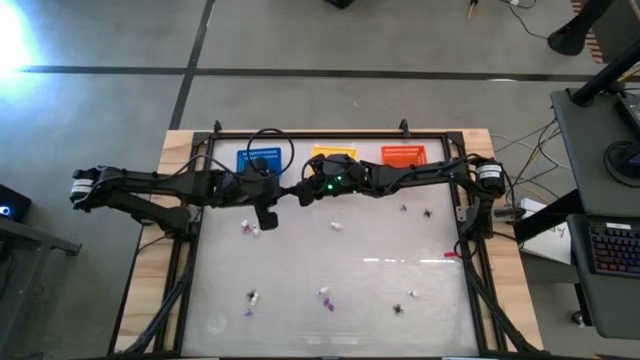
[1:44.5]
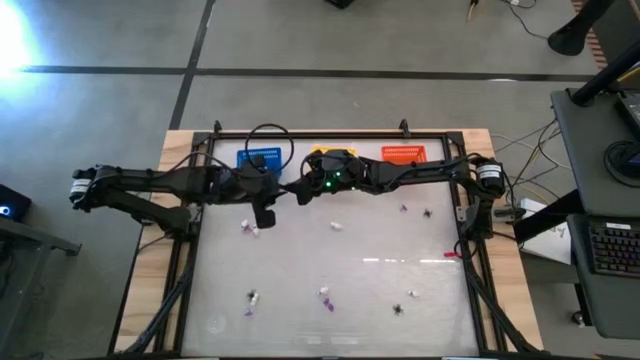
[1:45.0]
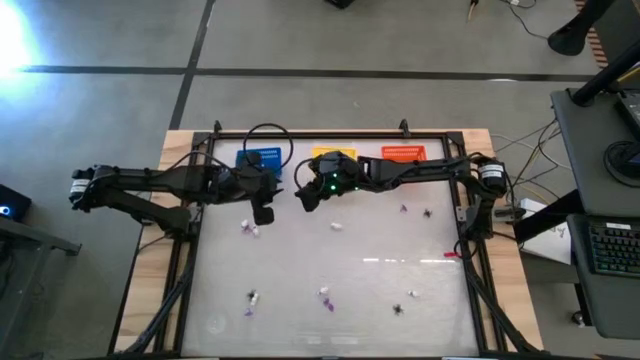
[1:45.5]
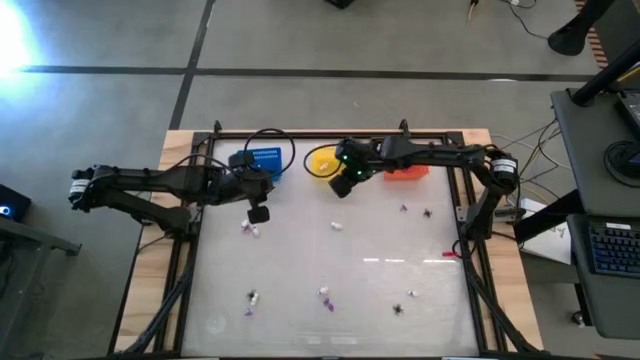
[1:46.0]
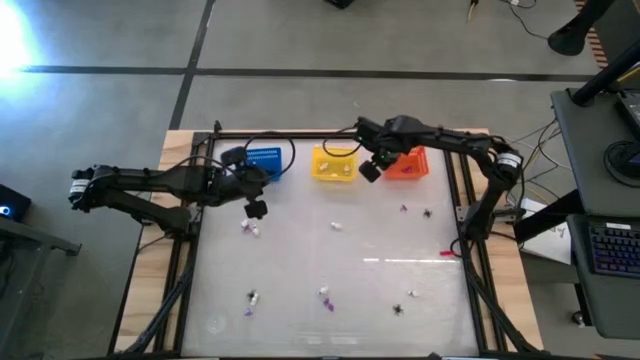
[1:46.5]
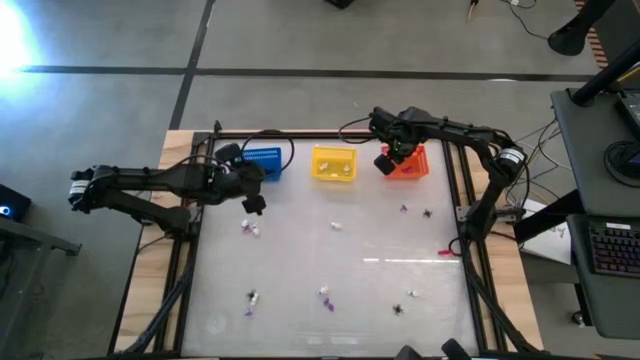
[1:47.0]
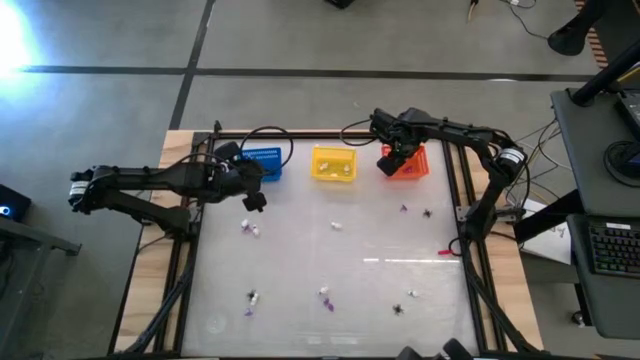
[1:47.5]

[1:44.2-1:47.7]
Task: Sort Halloween decoration
Put the purple hat toy into the orange bin

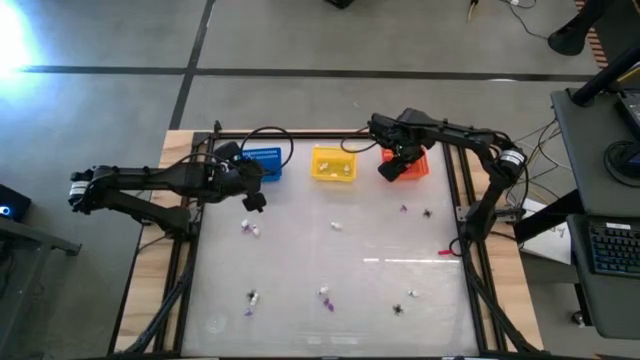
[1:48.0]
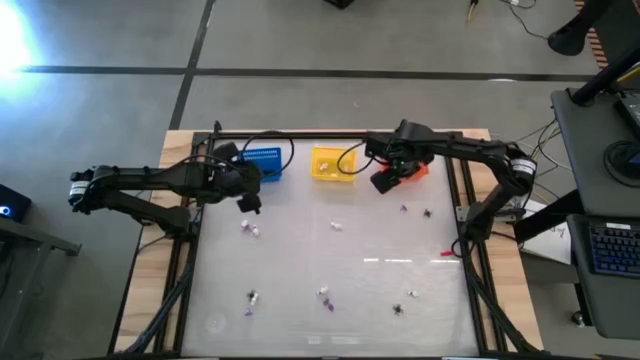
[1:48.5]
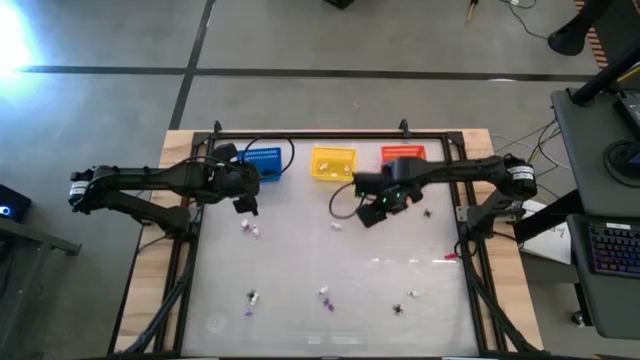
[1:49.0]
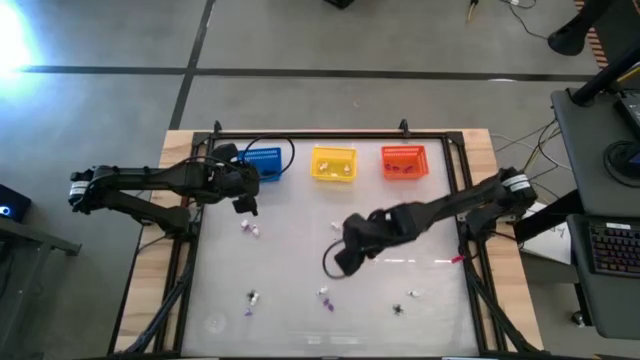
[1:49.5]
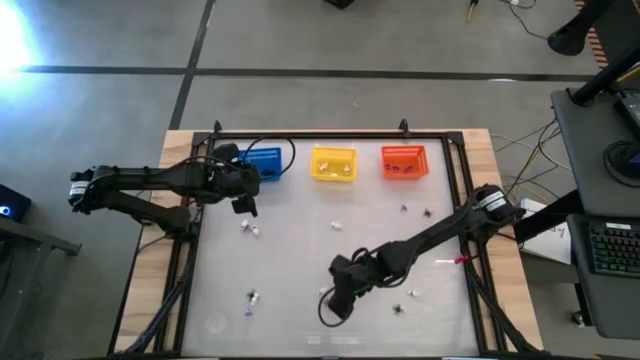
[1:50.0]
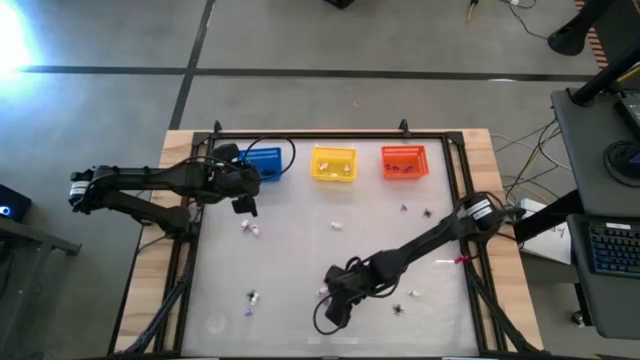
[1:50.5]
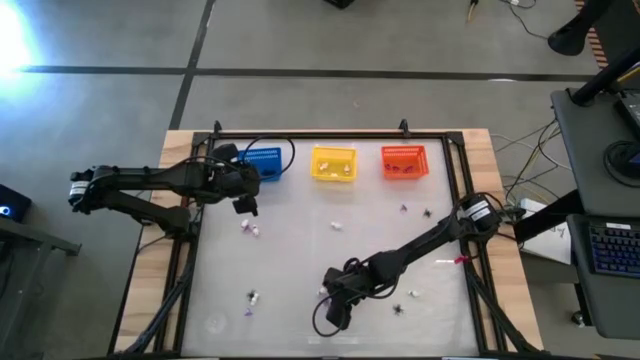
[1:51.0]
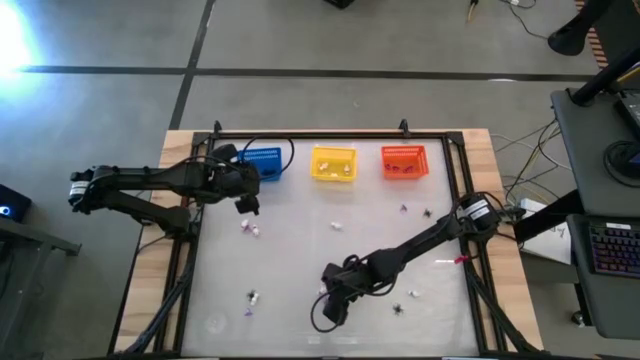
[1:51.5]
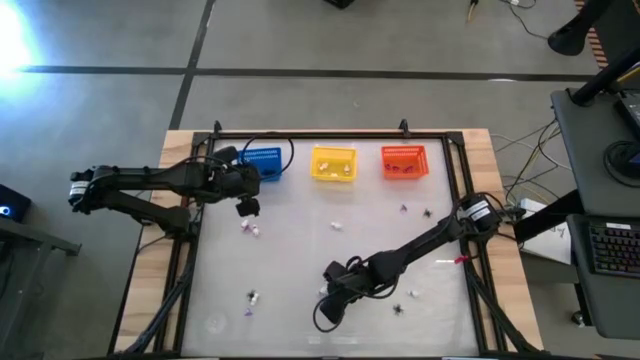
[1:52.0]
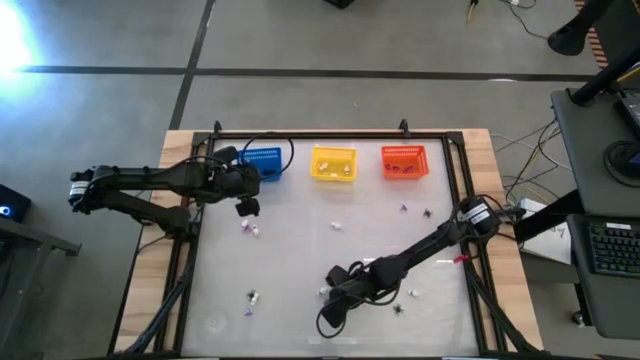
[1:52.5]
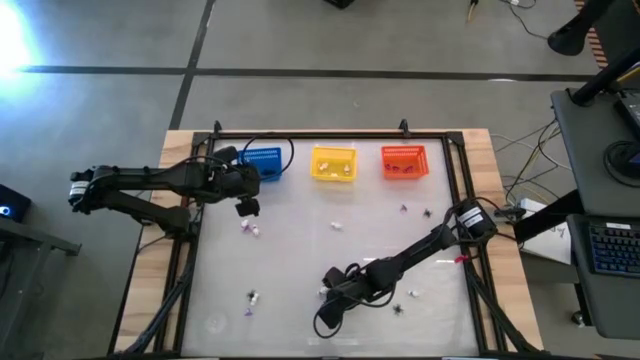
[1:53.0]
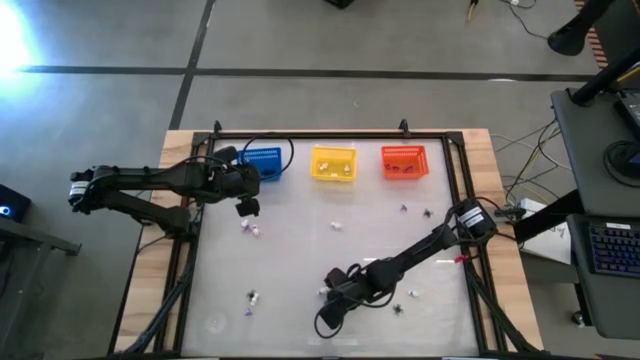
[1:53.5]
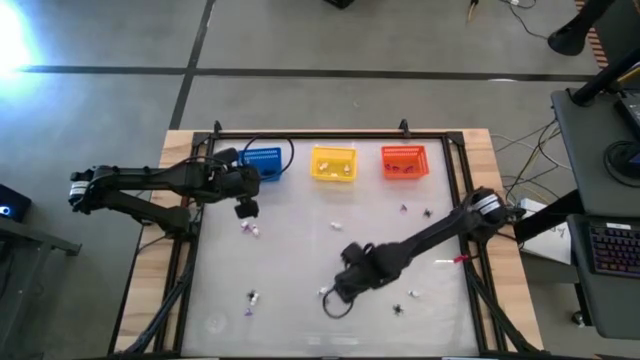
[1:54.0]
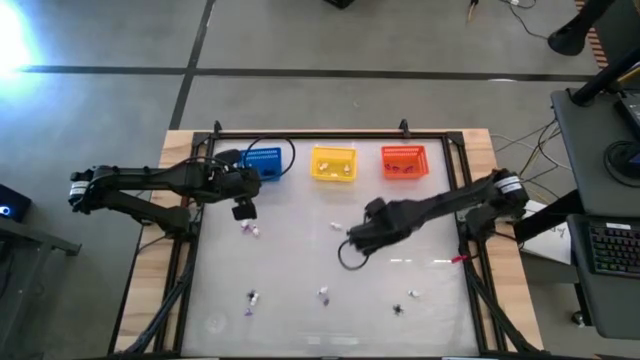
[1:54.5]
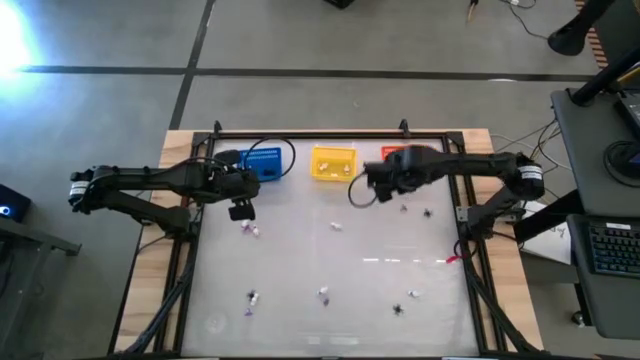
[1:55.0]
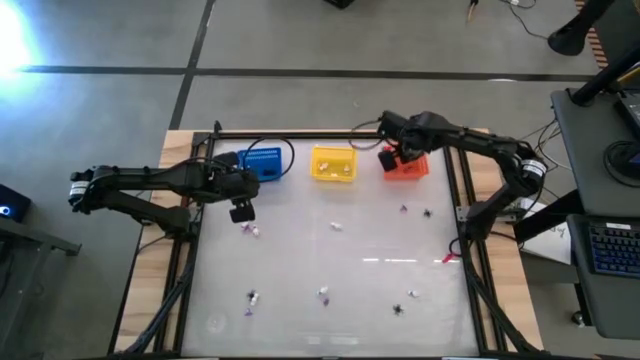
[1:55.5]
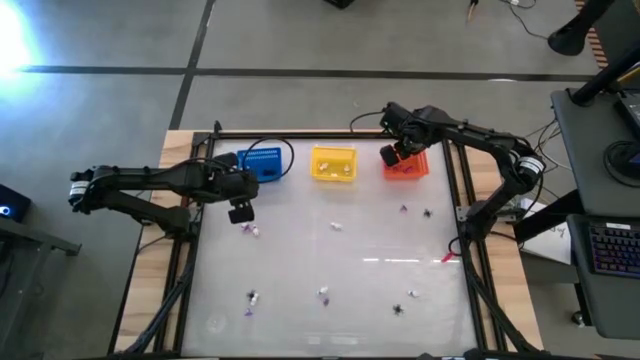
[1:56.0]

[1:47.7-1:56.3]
Put the purple hat toy into the orange bin

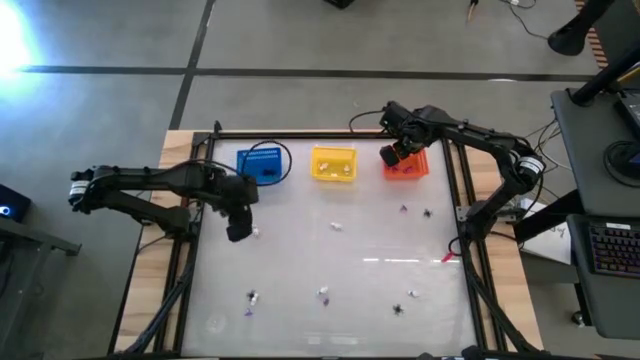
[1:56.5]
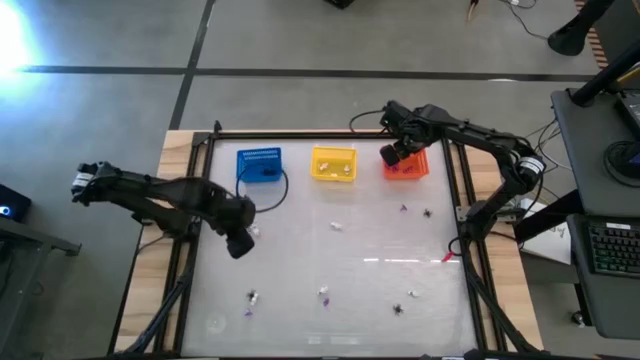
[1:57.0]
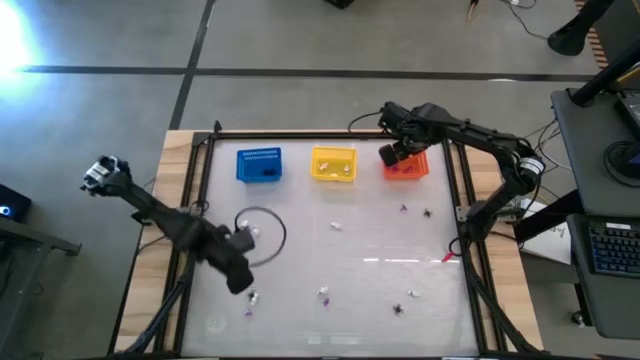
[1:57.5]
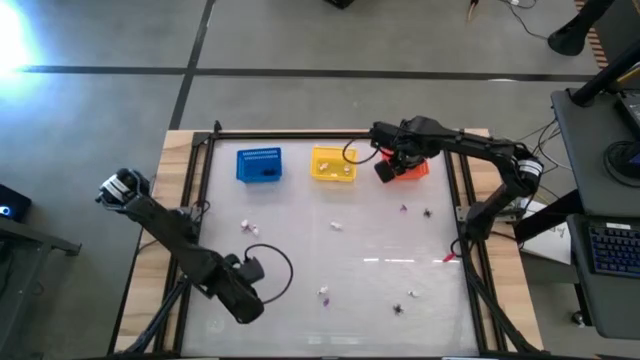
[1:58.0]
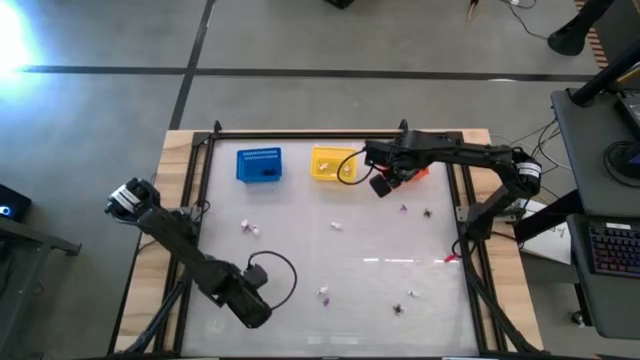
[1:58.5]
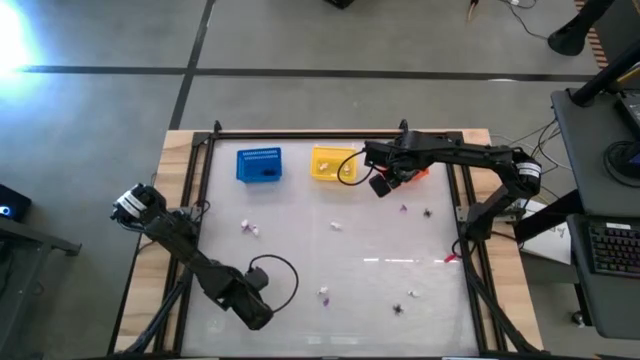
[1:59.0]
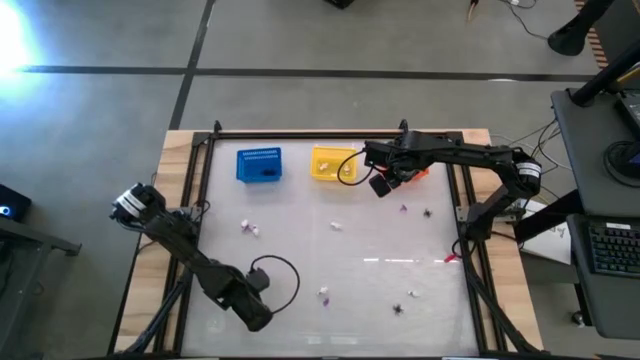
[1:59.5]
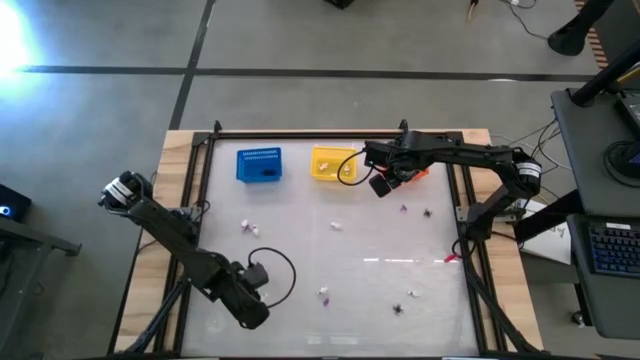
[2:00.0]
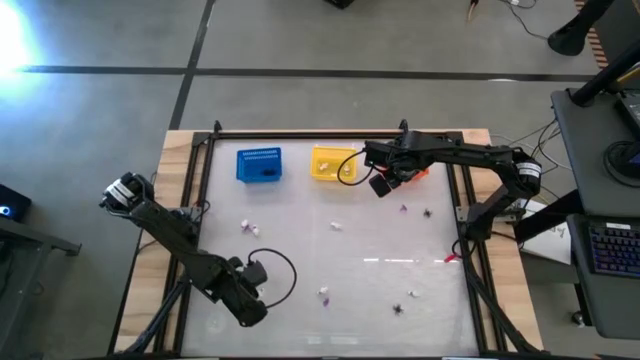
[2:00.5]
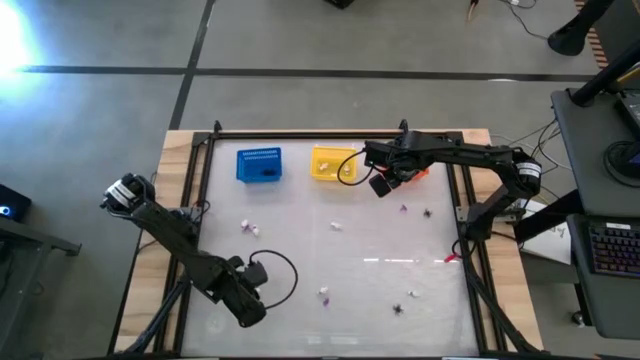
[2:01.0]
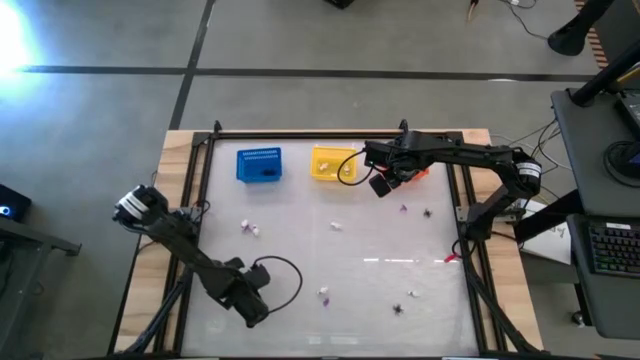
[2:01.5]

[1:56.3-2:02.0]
Put the white skeleton toy into the yellow bin

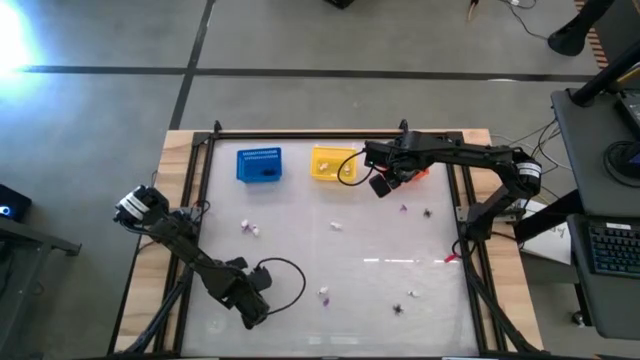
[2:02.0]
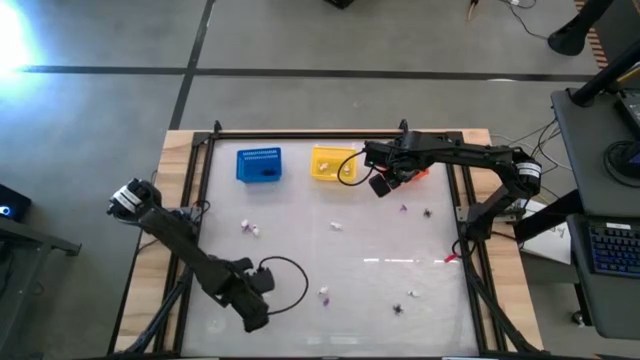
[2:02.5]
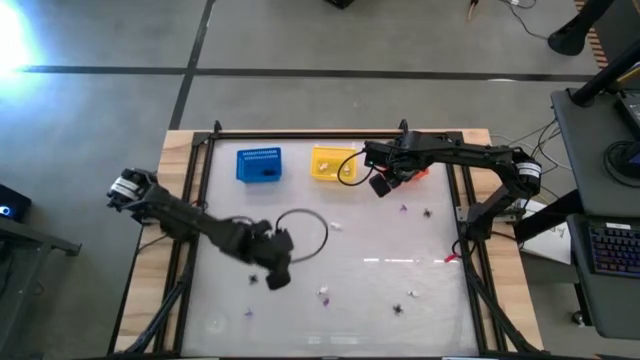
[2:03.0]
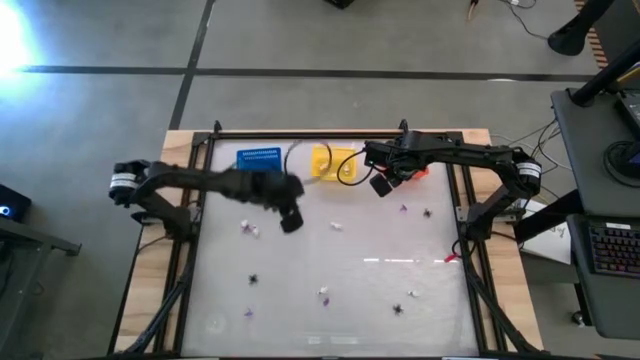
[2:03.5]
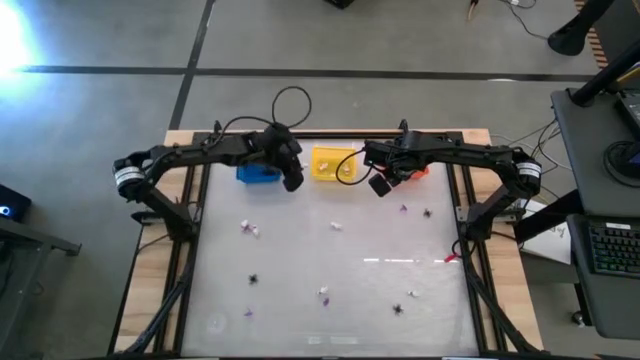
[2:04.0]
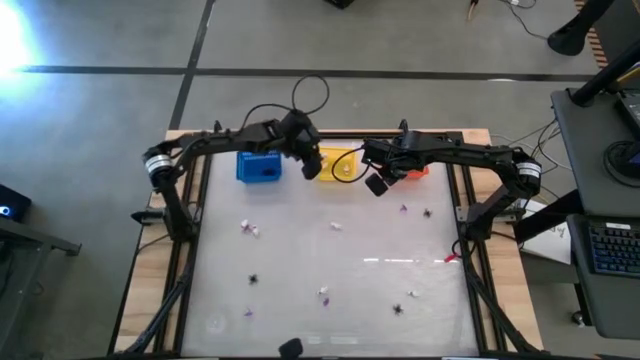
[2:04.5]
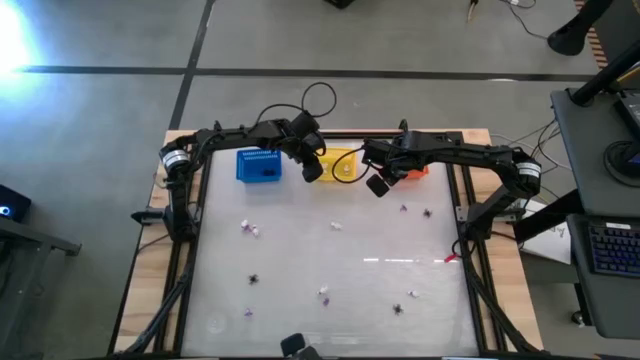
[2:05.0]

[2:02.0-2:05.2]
Put the white skeleton toy into the yellow bin
